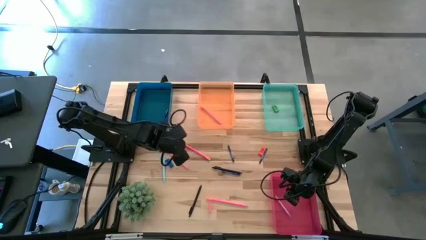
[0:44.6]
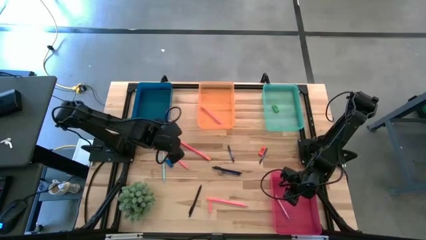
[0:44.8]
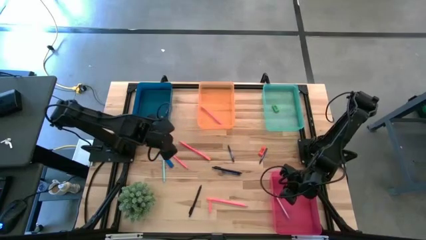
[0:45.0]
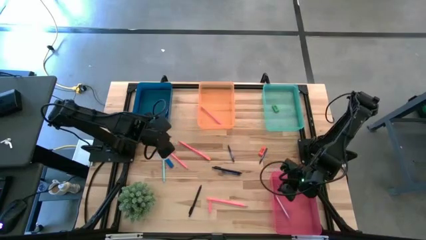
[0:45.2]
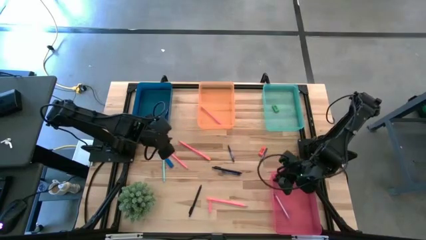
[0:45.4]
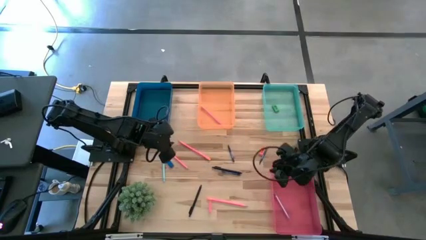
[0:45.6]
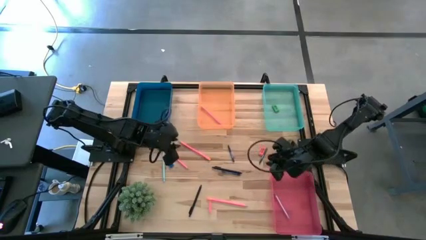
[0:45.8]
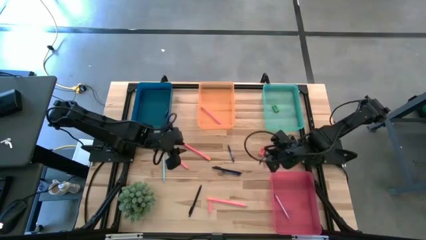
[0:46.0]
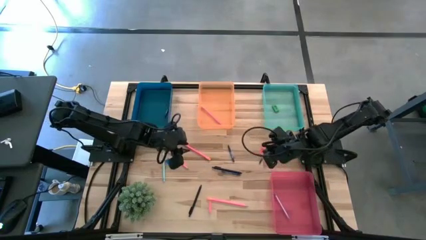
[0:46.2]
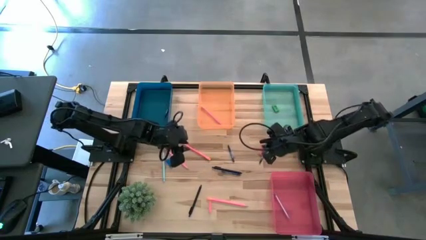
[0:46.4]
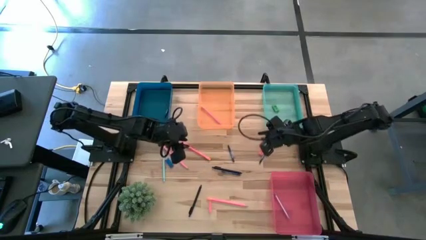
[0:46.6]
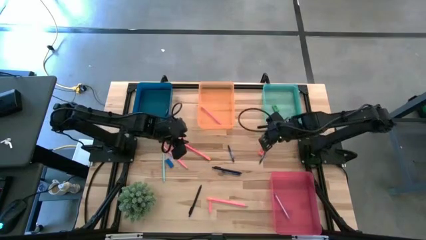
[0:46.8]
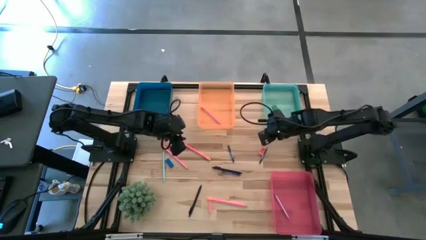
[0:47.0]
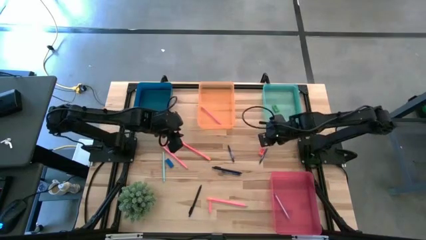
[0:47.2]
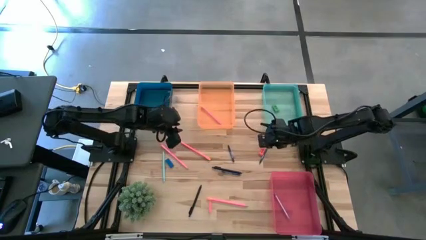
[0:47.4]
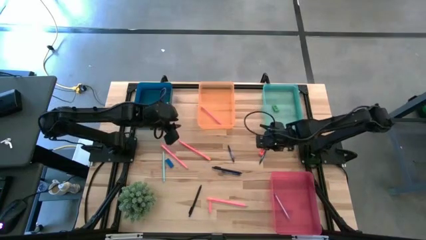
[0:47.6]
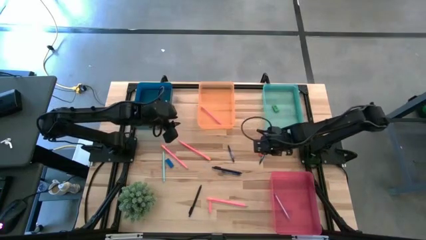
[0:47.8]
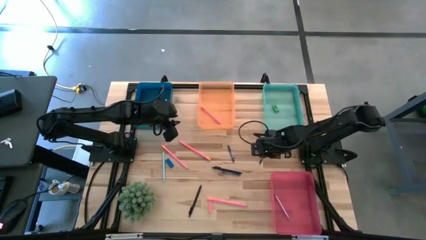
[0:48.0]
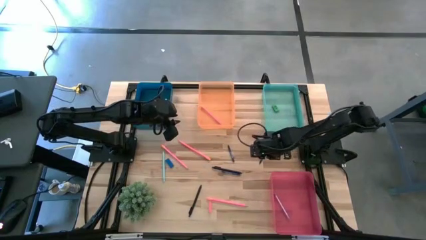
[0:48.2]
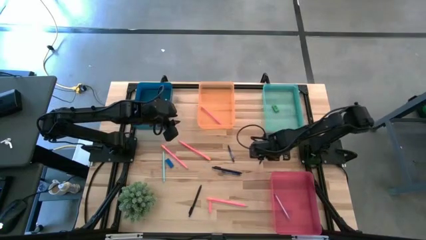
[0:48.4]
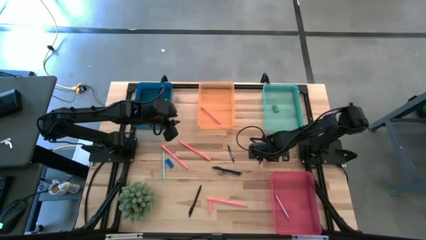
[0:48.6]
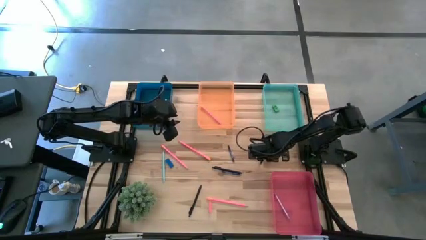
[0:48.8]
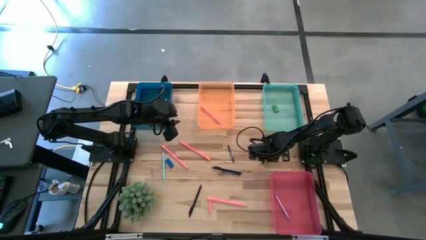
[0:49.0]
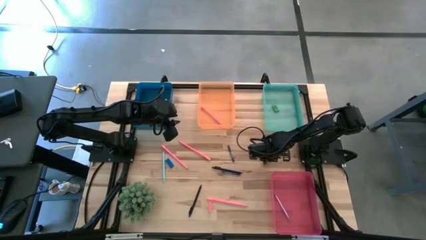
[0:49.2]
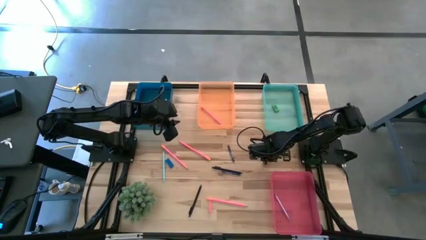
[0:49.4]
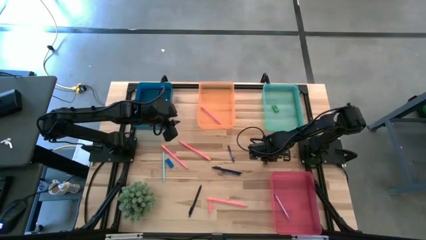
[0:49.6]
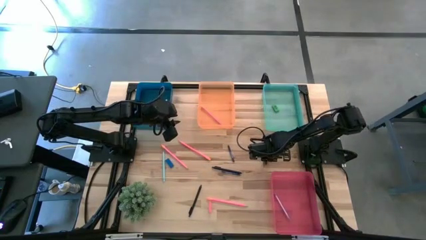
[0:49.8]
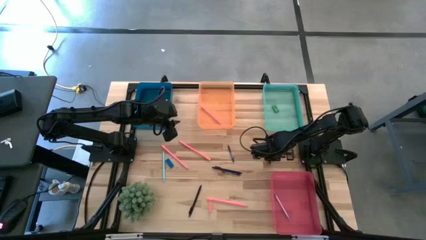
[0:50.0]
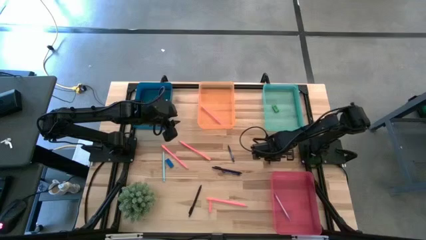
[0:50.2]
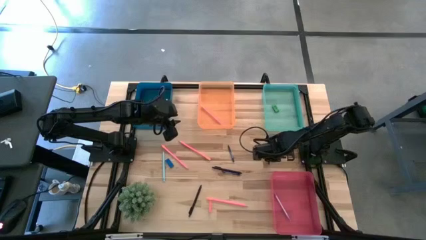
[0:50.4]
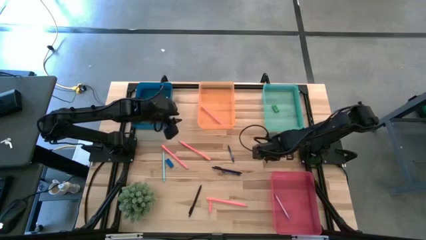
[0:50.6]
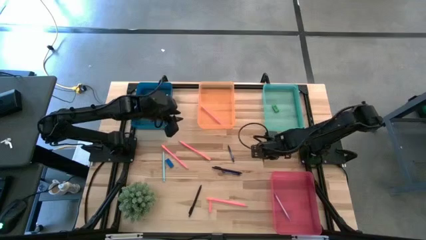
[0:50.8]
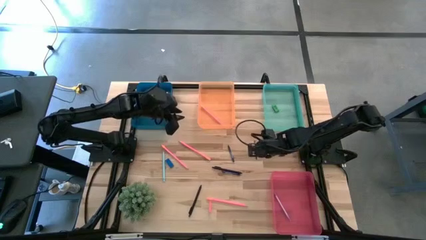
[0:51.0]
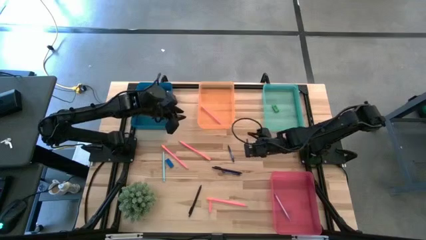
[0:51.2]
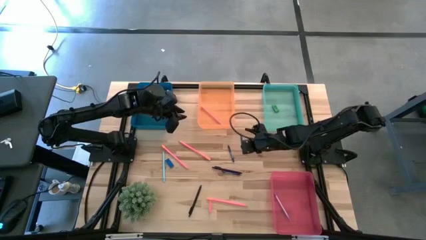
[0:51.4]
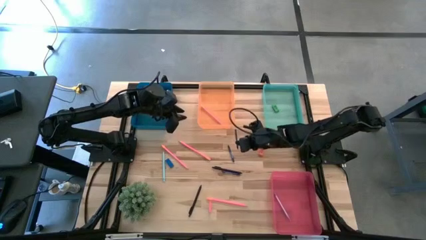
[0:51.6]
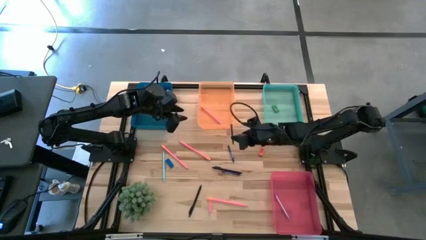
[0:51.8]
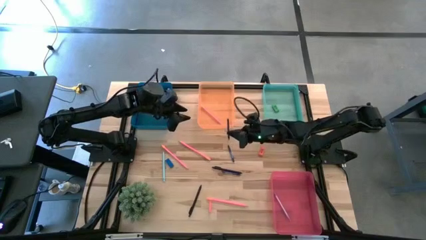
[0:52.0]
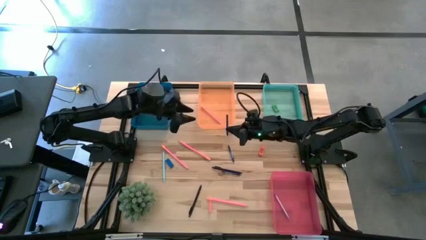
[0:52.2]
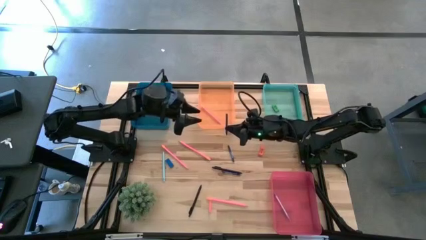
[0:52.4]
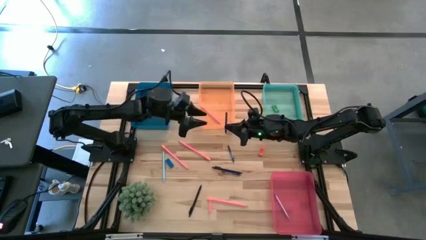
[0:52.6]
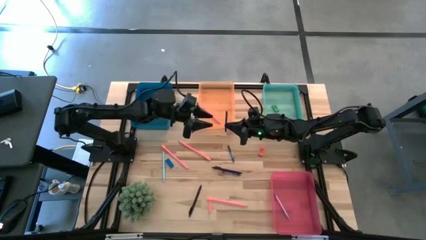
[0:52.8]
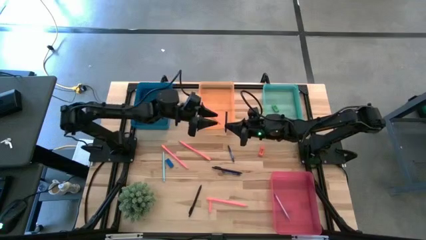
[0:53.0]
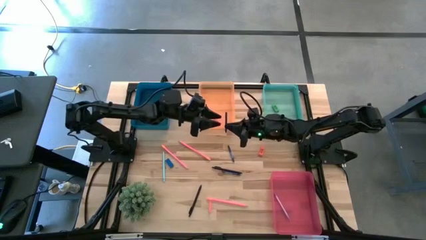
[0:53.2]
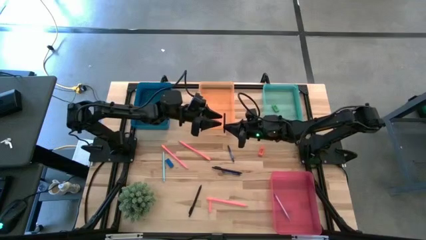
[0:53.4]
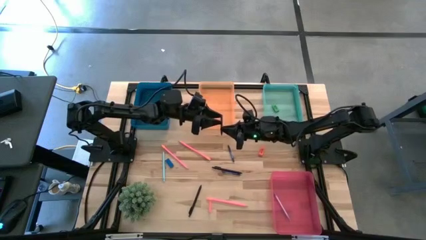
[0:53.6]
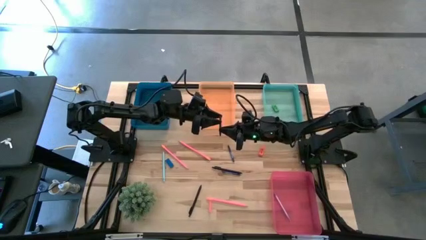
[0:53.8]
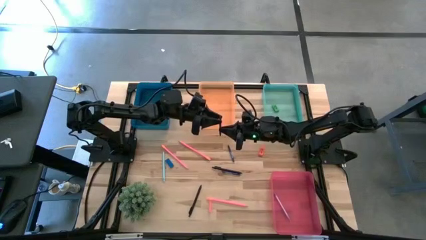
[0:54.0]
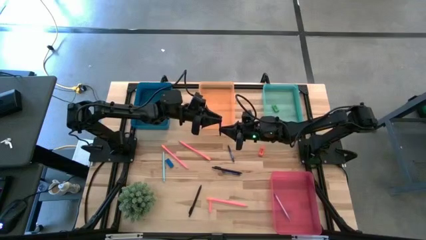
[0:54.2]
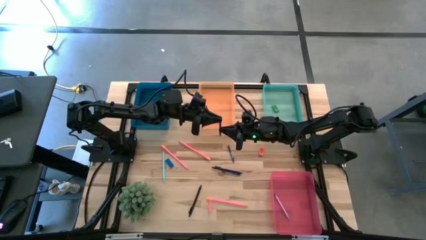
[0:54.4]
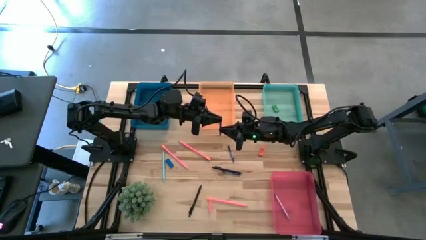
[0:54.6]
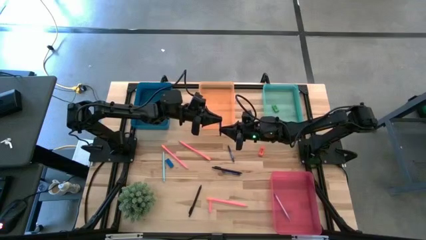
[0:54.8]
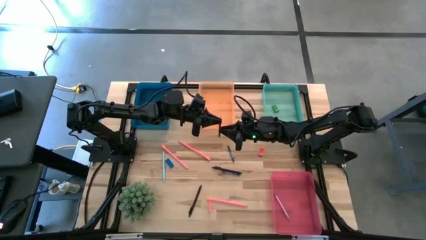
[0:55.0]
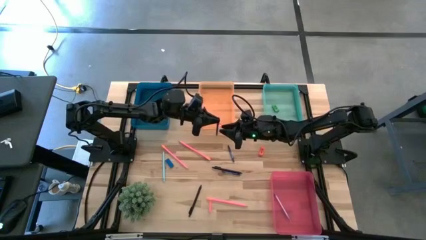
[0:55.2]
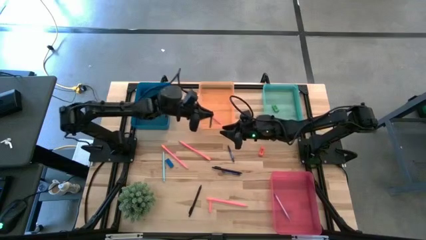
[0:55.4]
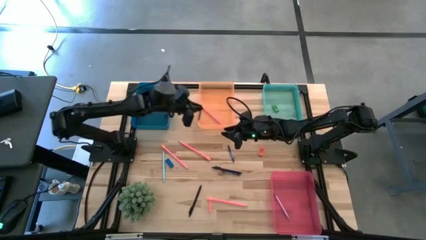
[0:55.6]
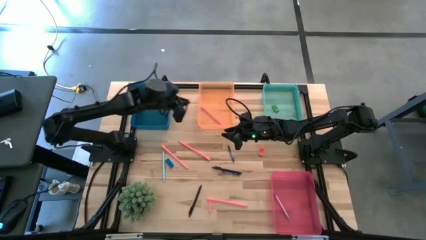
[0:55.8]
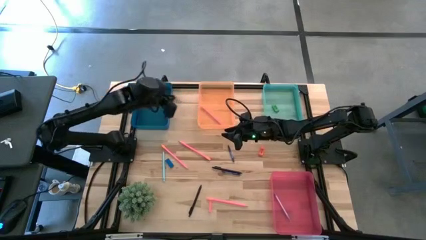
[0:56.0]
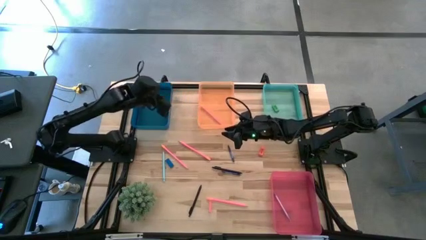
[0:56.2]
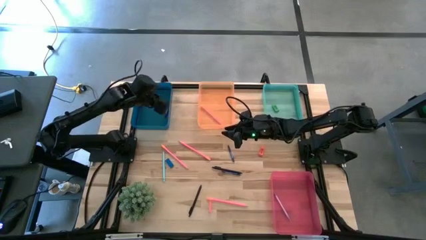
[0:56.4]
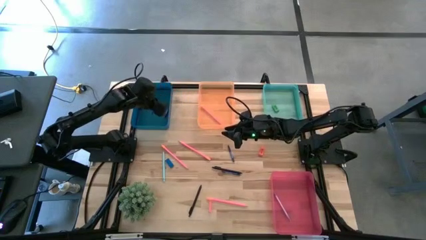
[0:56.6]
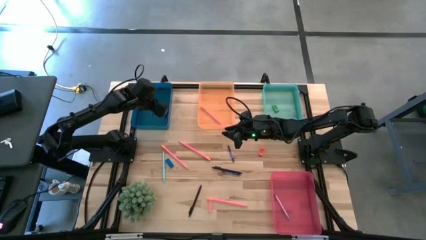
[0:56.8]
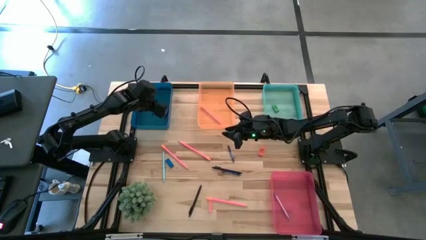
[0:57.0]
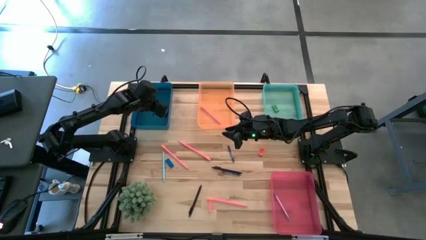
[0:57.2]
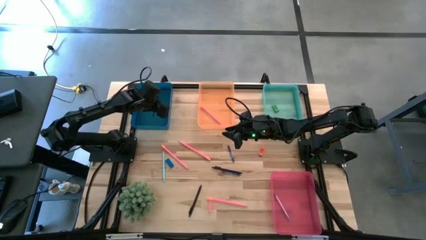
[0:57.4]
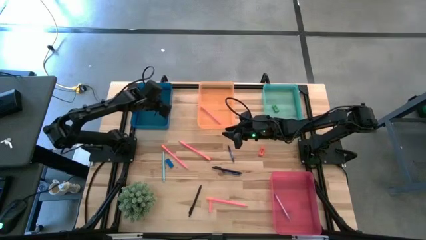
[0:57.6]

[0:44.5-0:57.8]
Task: Sort crayons/erasers/pens/pencils in bins
Put the blue crayon into the blue bin

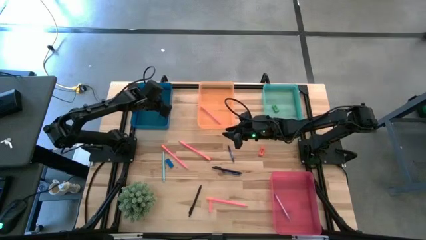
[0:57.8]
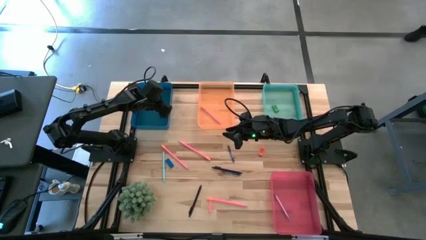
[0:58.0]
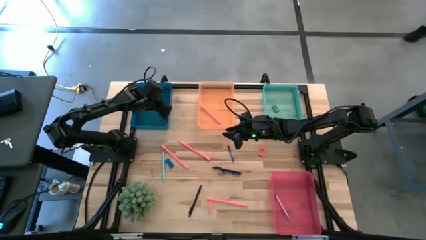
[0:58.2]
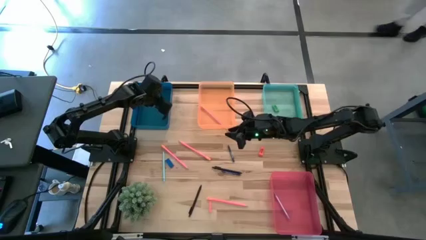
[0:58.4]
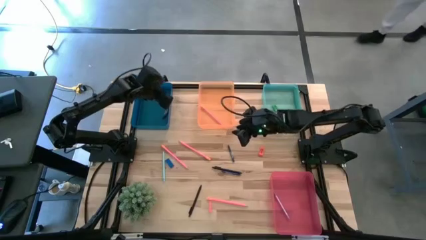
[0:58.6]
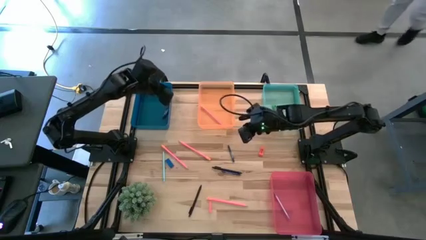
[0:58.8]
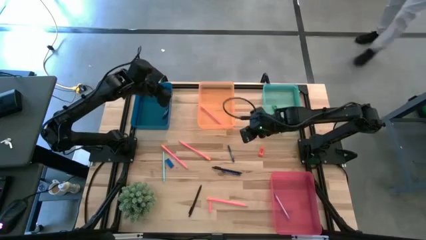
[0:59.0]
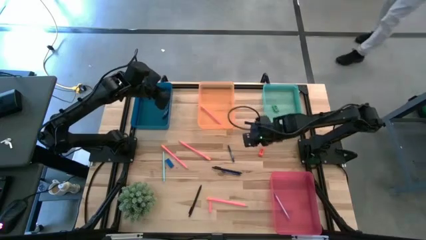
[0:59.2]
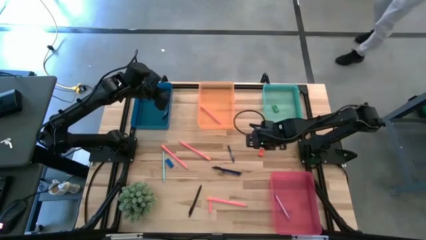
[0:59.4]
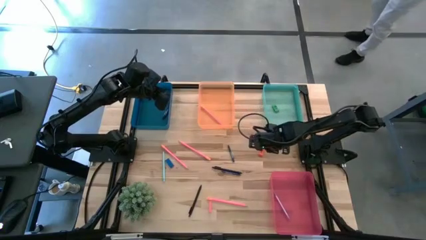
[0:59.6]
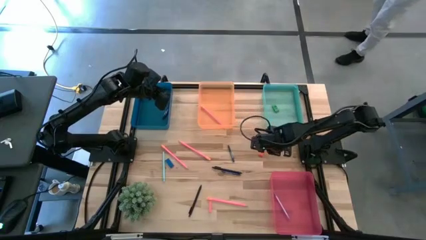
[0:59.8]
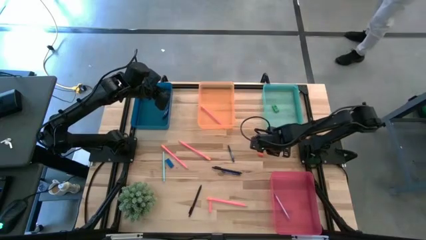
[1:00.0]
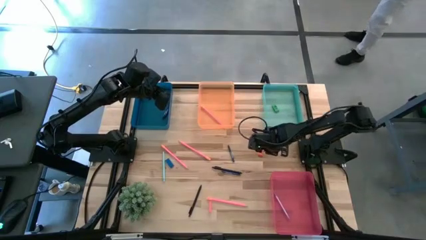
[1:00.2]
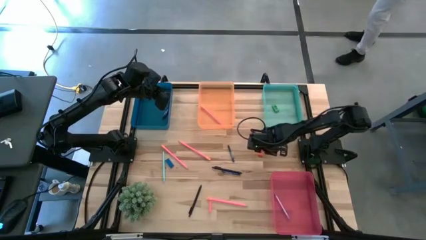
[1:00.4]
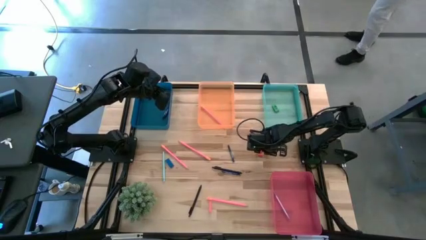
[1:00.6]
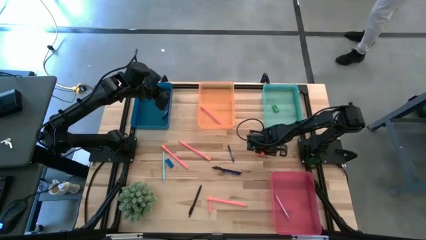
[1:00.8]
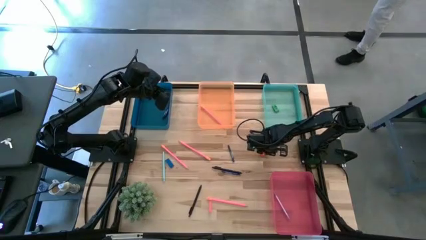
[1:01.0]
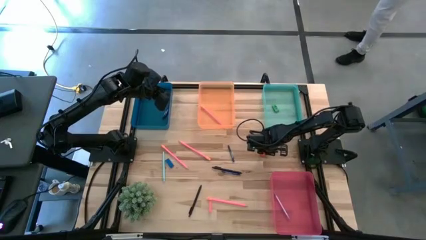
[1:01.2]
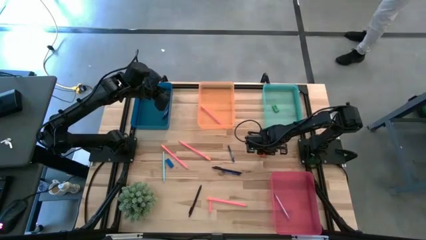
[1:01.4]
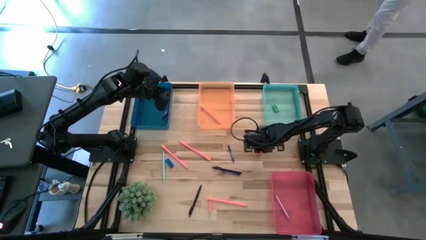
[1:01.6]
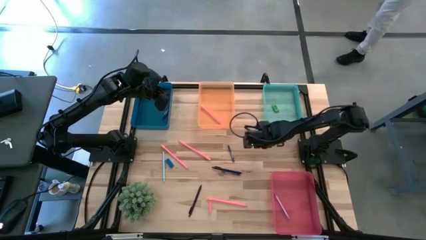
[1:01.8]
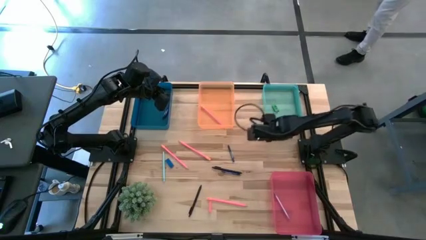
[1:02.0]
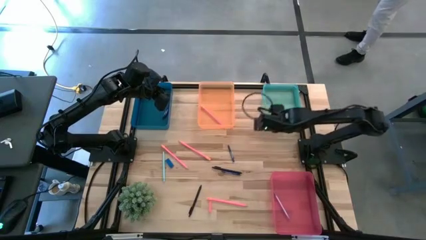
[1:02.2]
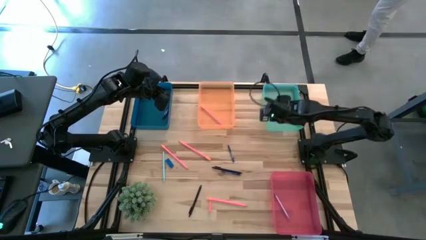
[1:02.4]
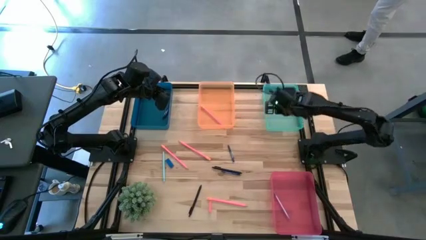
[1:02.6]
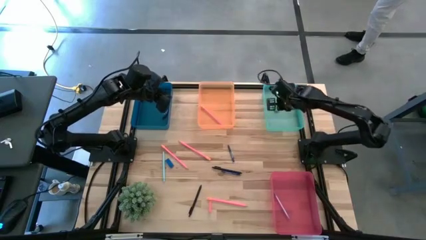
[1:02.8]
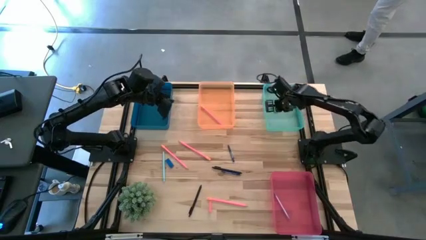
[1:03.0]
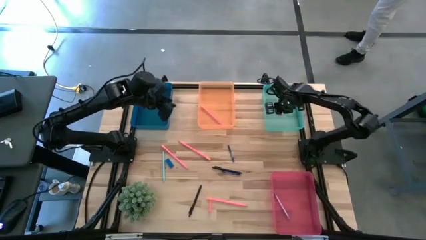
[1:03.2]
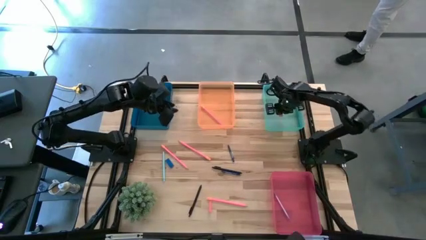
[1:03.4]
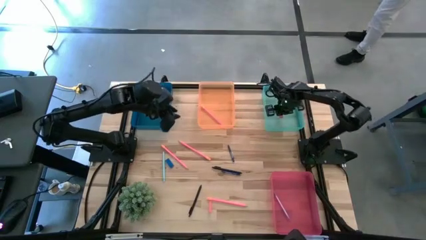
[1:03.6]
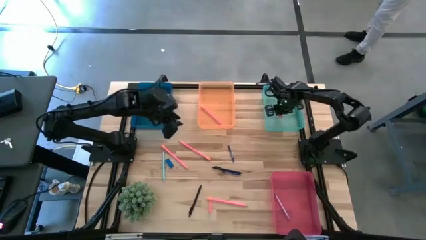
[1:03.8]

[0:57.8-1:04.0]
Put the orange eraser into the green bin
